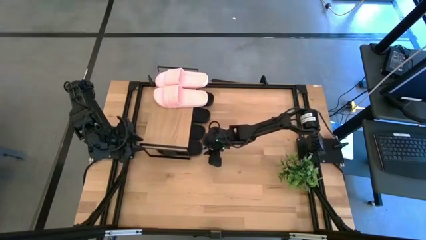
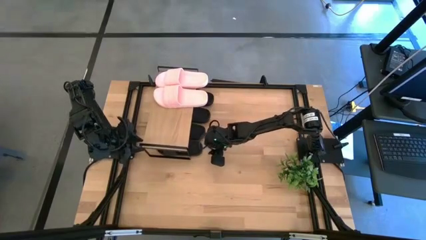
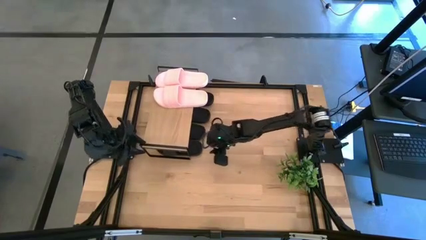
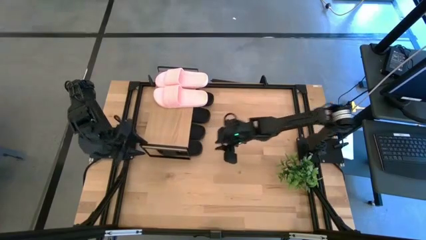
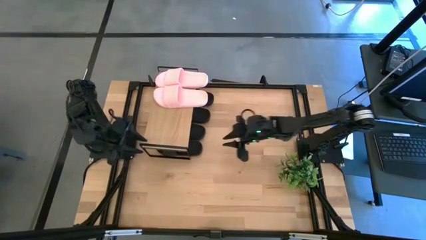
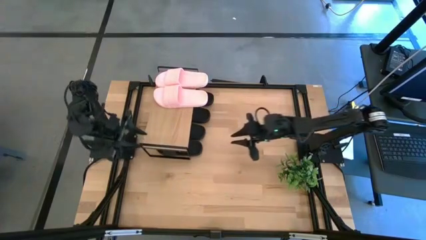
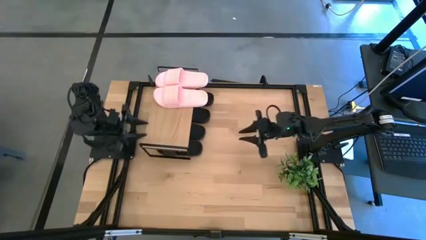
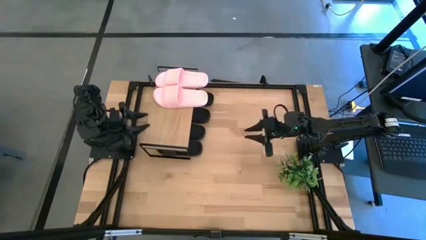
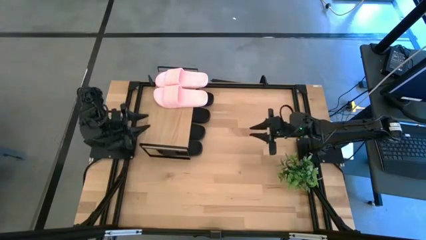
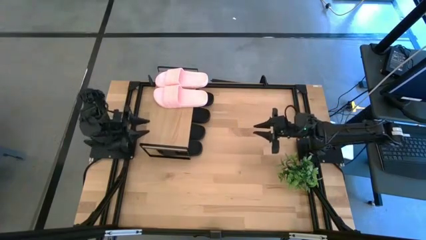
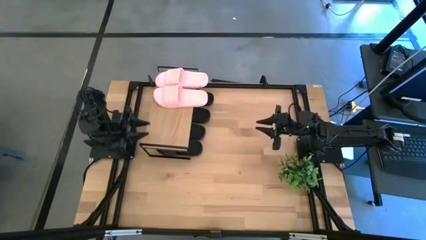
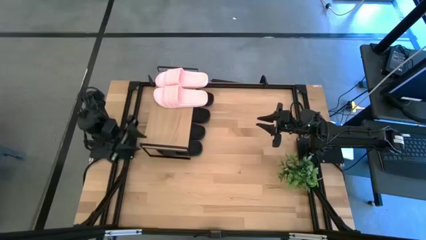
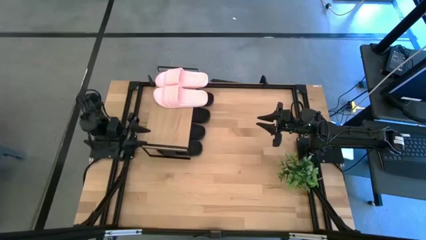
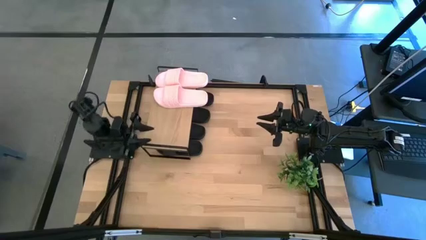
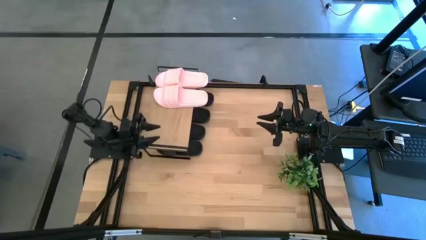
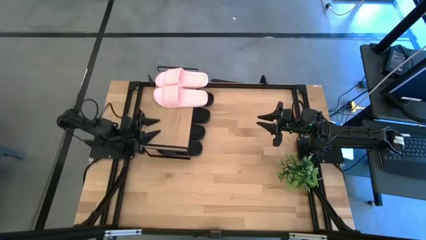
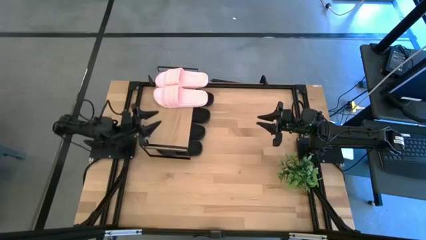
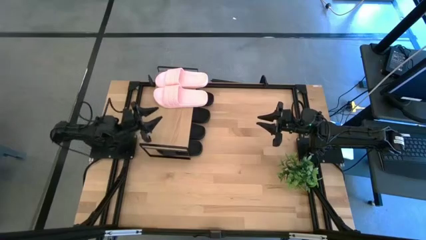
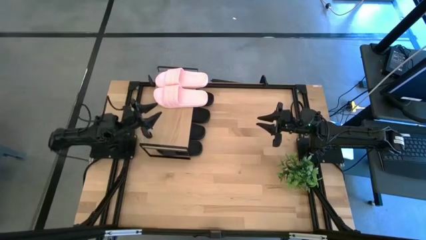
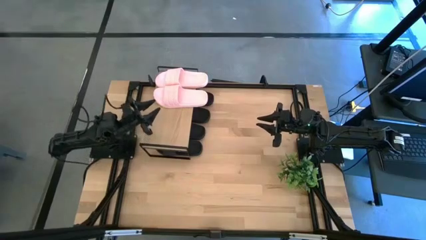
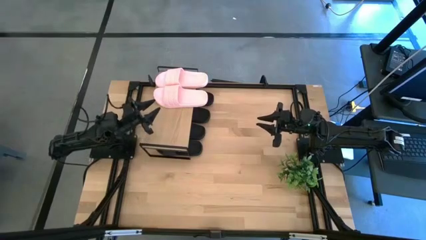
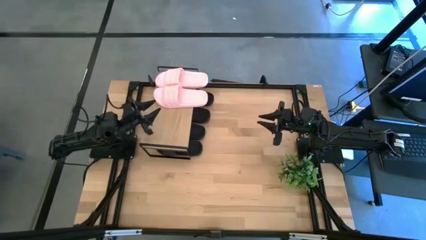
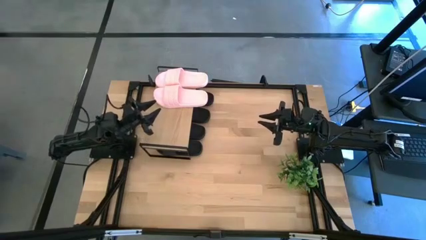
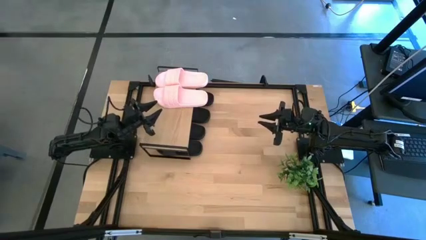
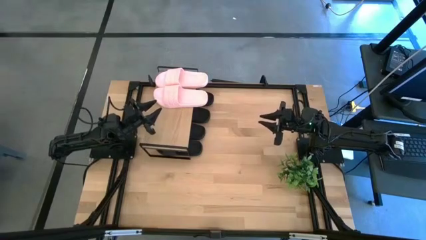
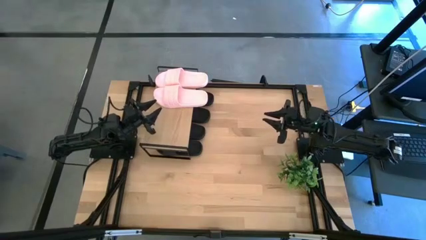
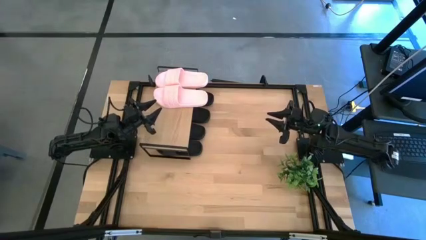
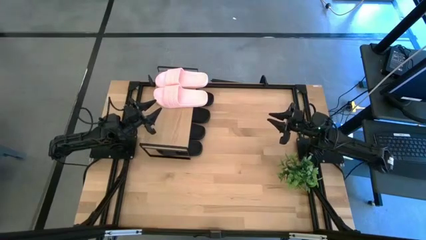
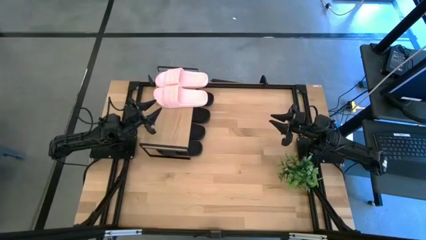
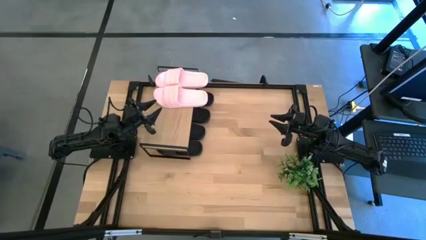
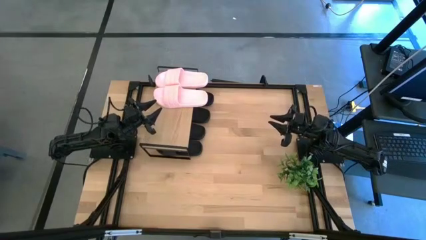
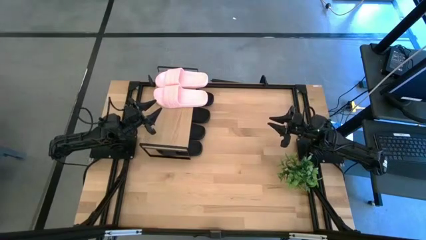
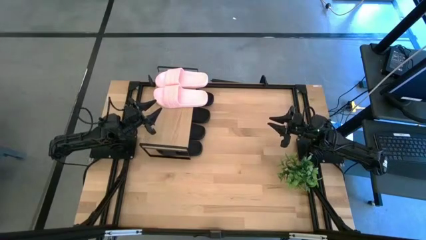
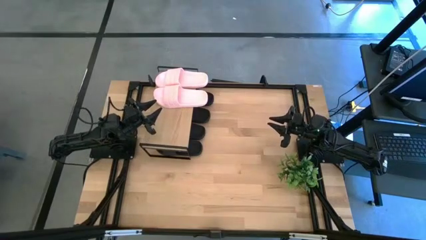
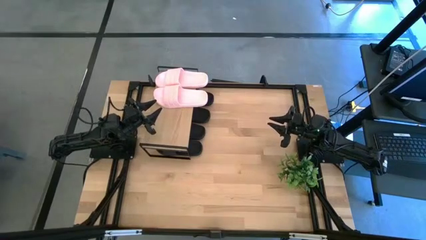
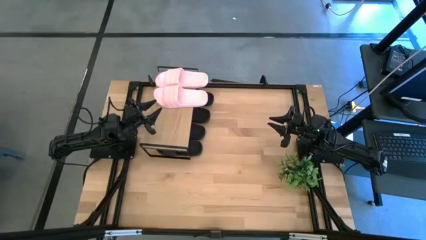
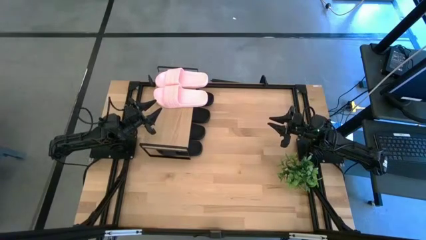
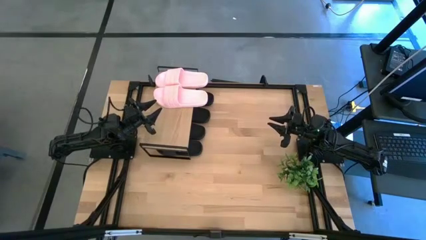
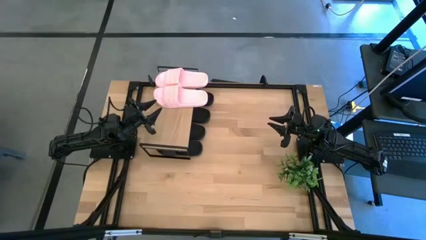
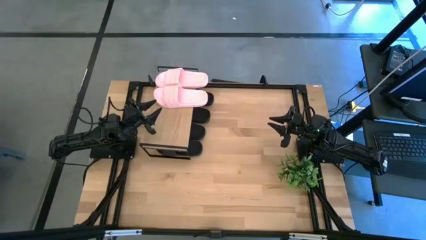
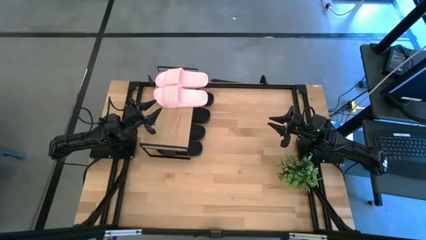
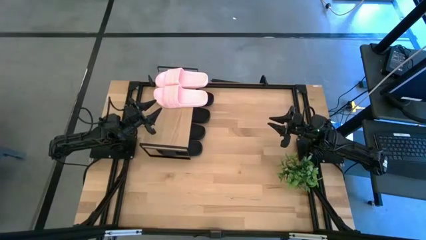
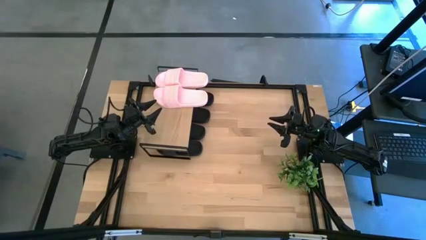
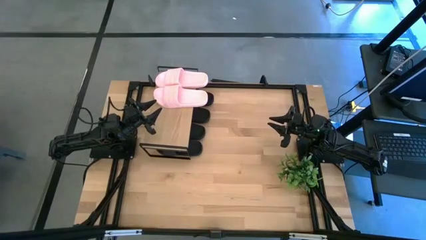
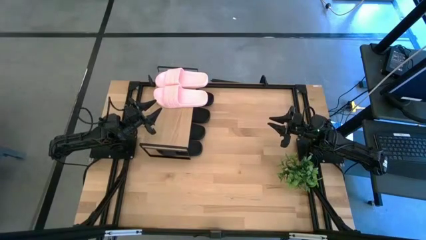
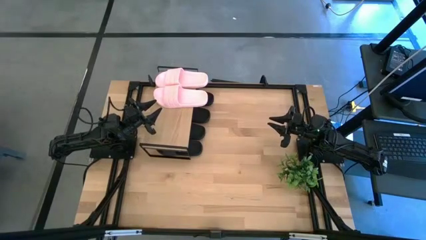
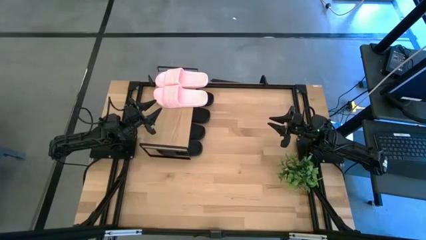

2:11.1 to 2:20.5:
Task: Pick and place slides into the shelf
Return to Home Position

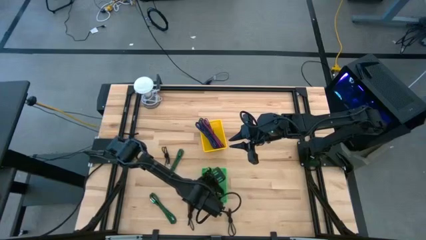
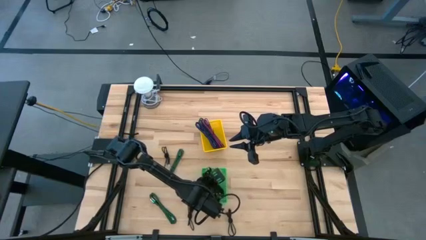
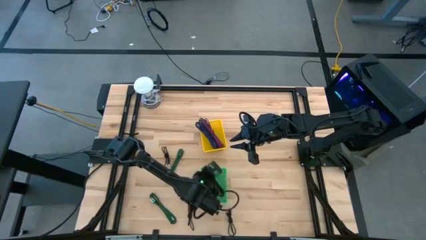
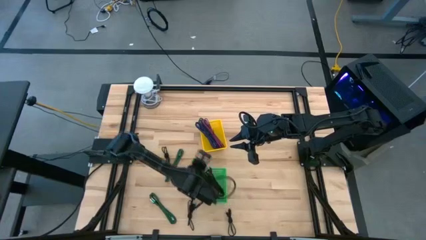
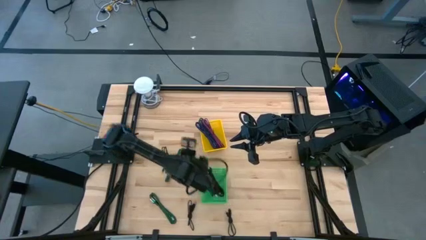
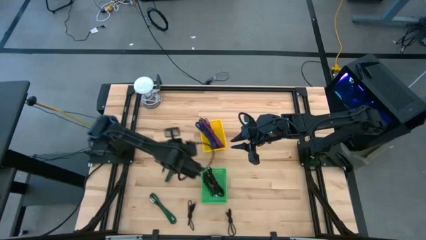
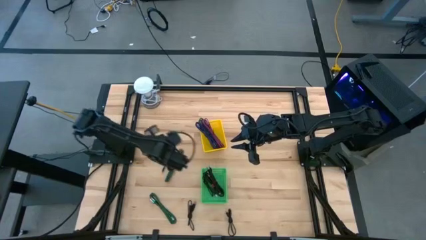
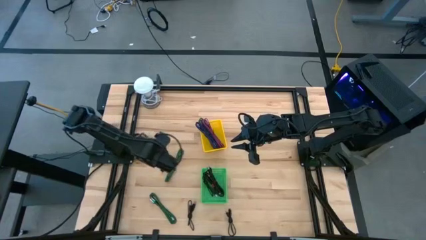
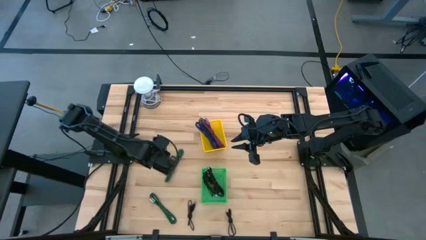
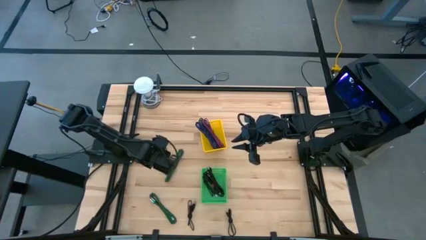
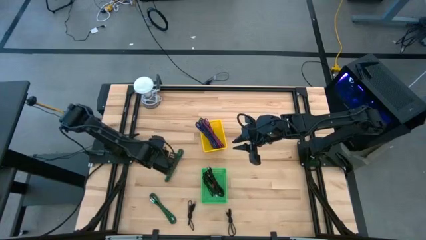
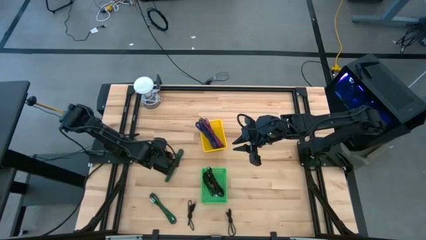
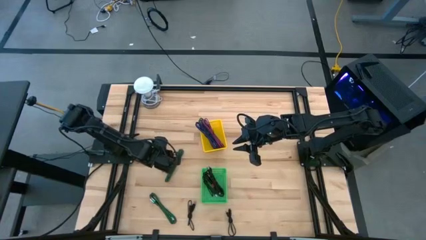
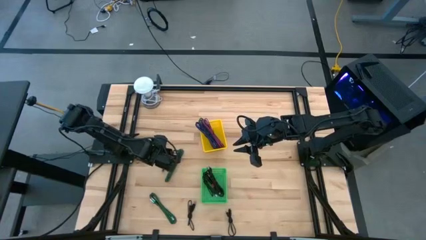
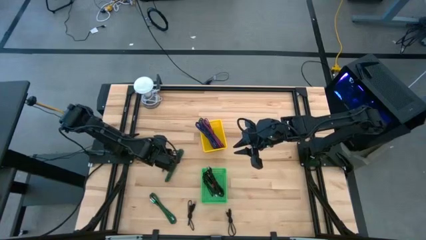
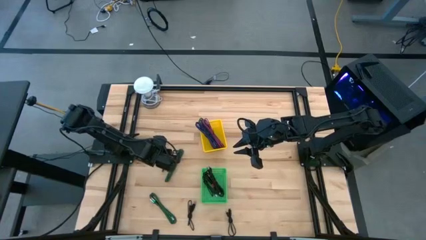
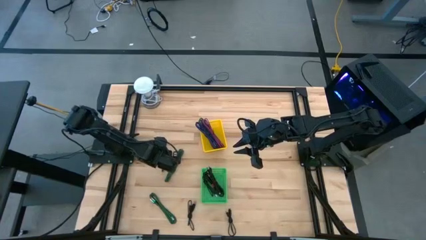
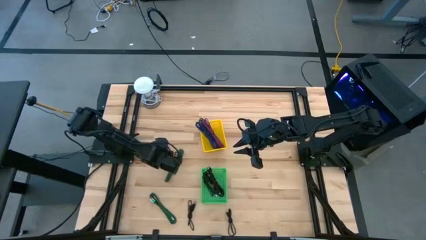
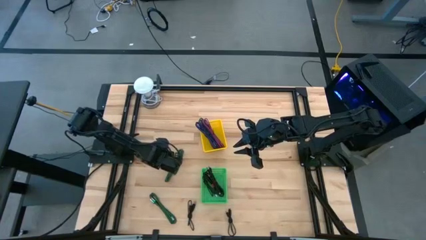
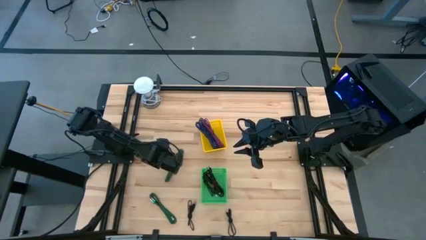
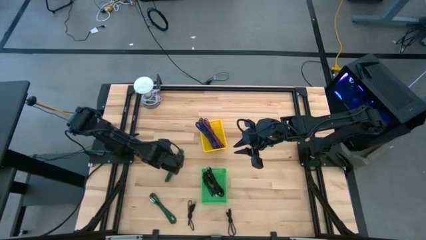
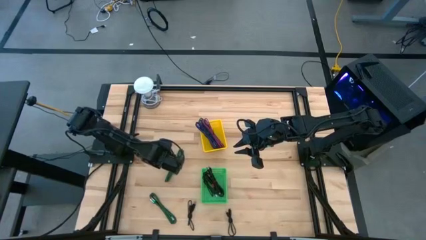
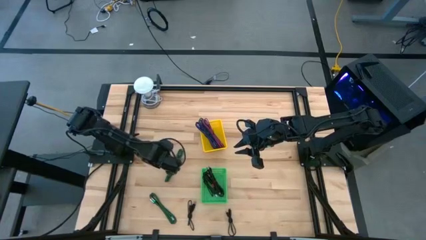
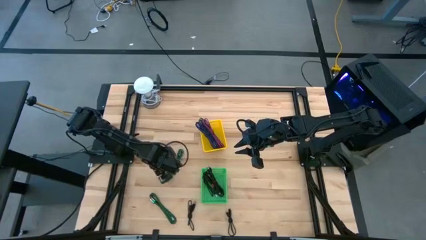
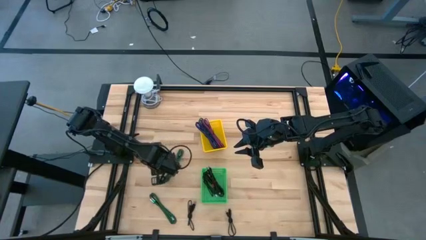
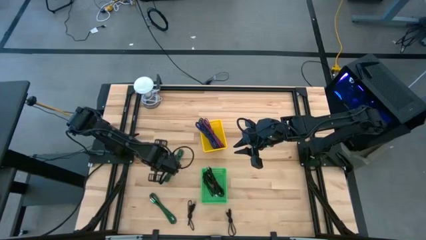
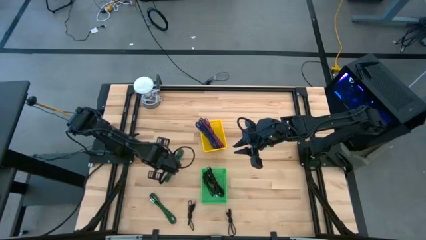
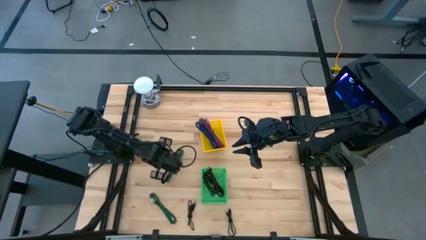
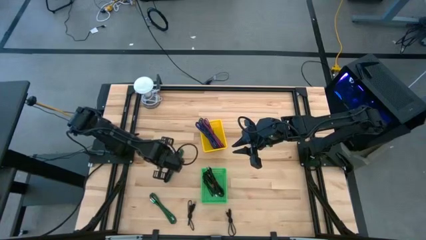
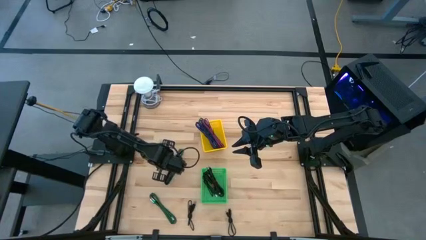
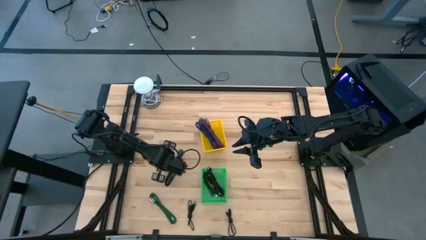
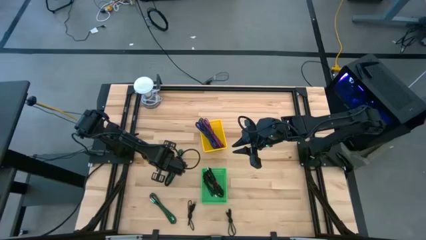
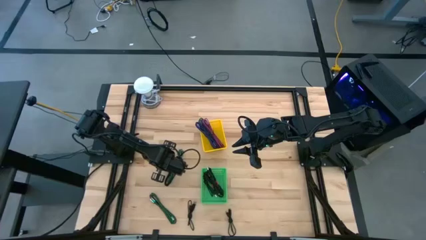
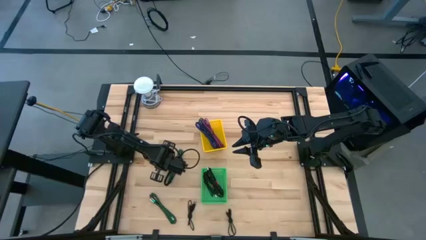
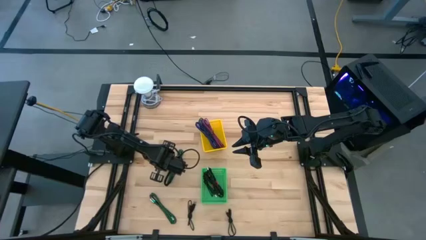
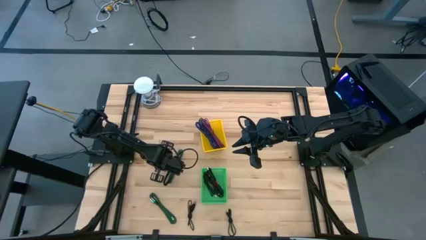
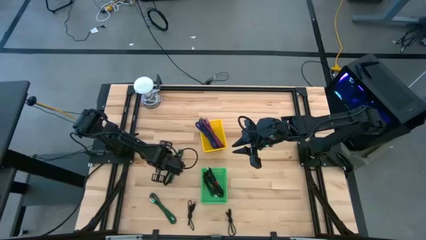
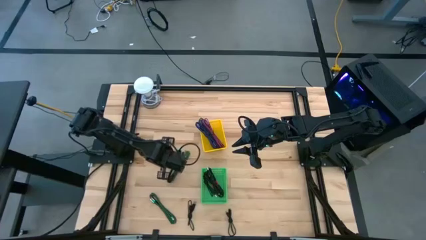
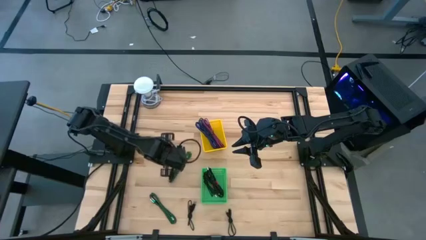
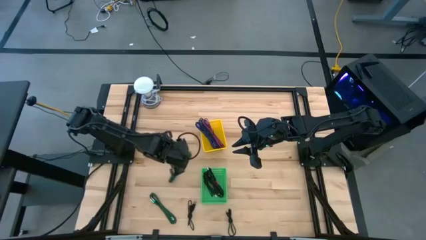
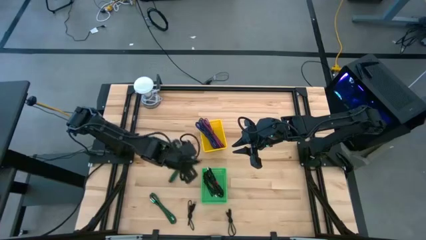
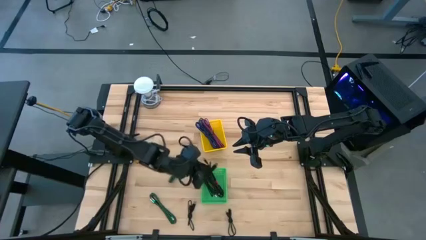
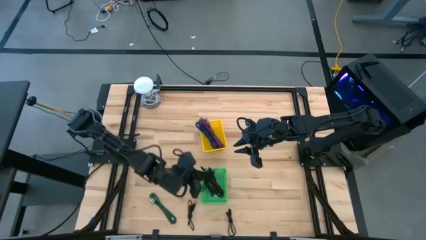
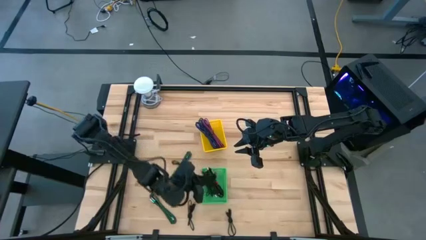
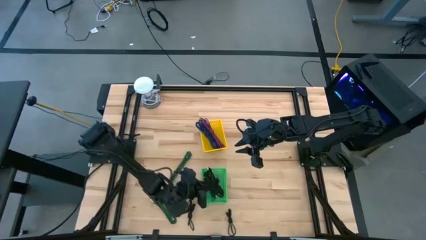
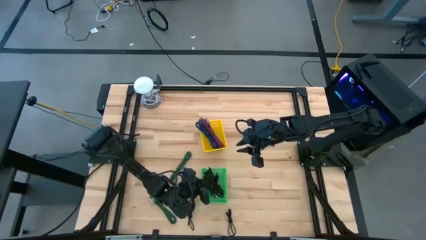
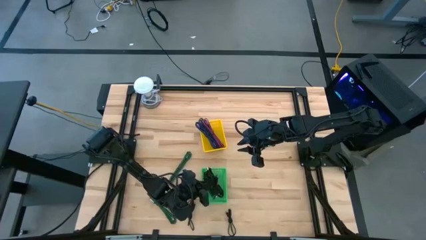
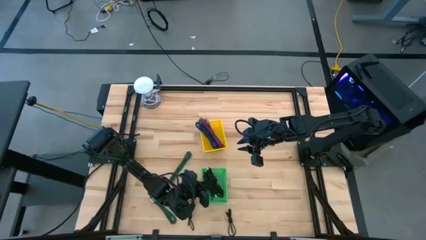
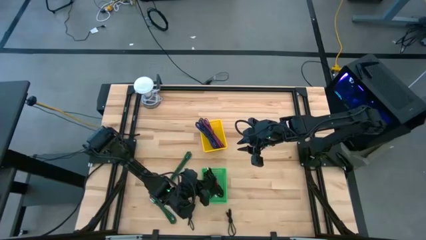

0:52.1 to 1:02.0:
Task: Pick & Place USB Port
Put the black charger cable into the green bin
